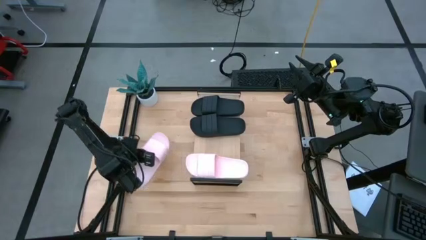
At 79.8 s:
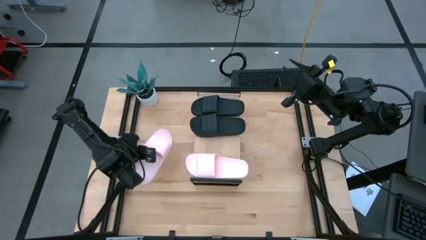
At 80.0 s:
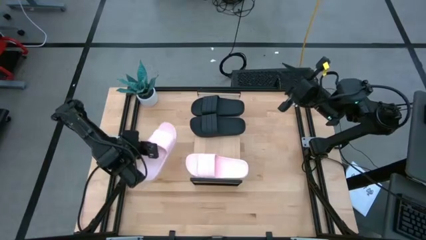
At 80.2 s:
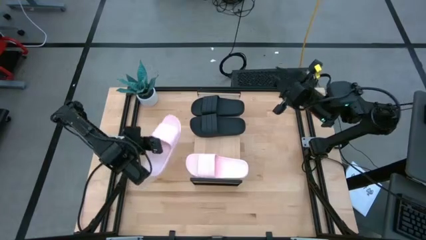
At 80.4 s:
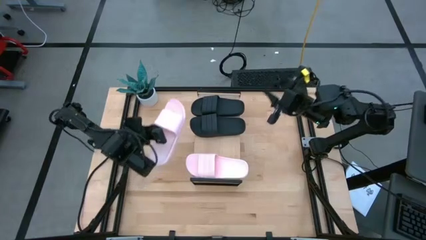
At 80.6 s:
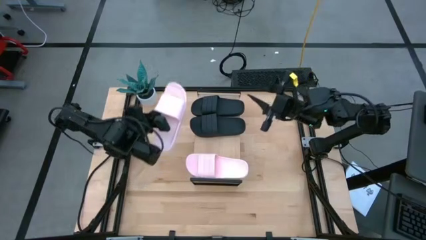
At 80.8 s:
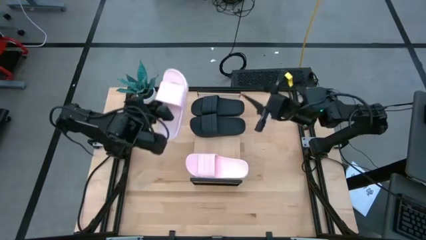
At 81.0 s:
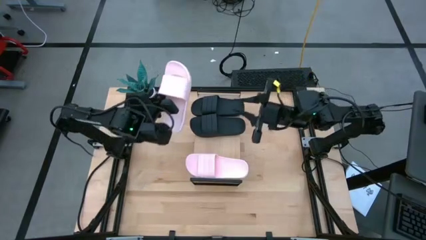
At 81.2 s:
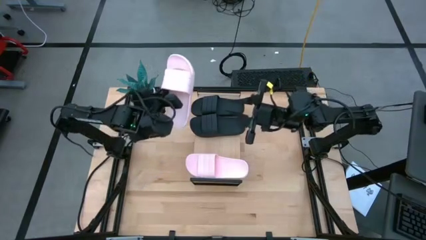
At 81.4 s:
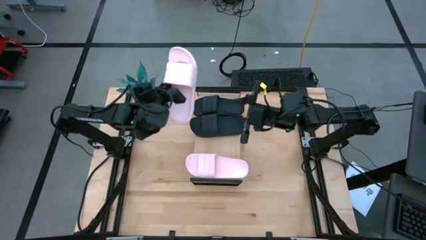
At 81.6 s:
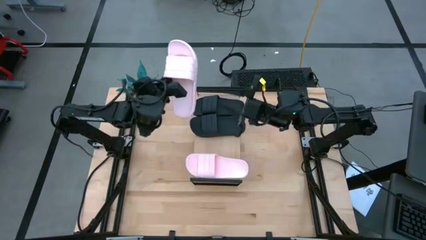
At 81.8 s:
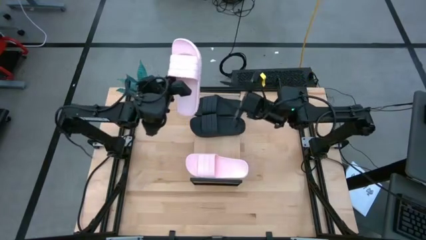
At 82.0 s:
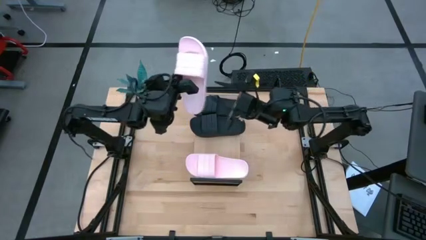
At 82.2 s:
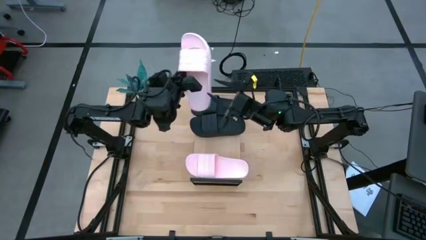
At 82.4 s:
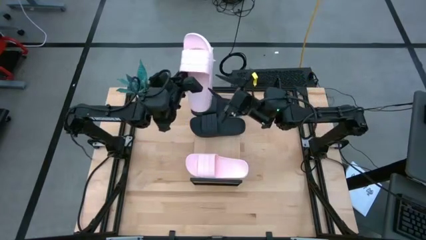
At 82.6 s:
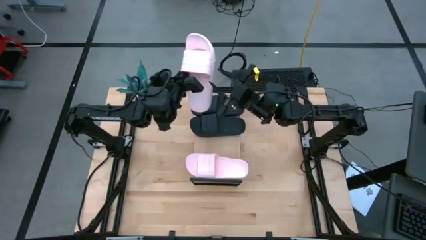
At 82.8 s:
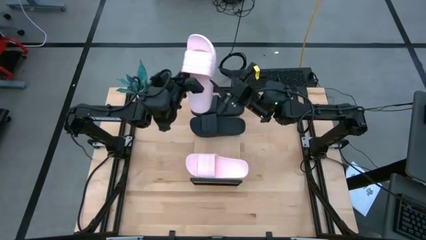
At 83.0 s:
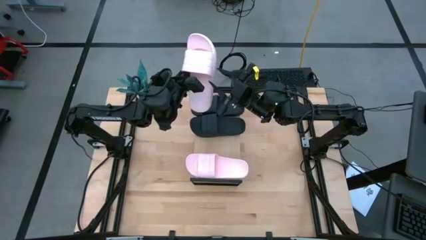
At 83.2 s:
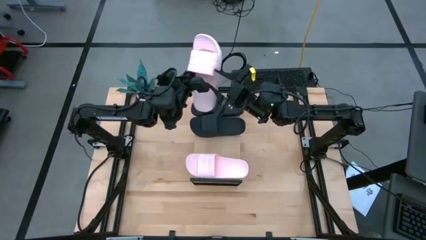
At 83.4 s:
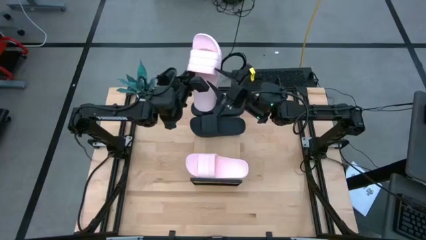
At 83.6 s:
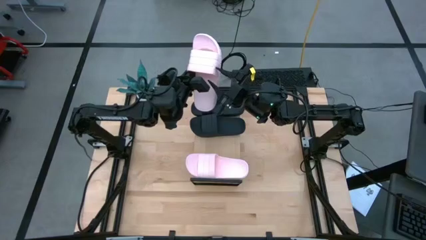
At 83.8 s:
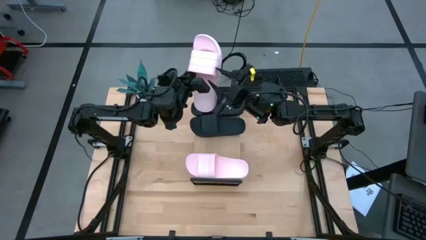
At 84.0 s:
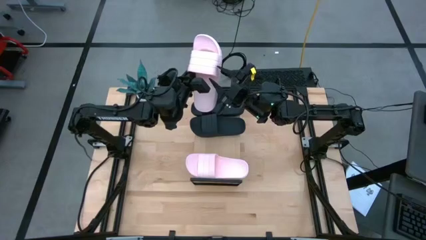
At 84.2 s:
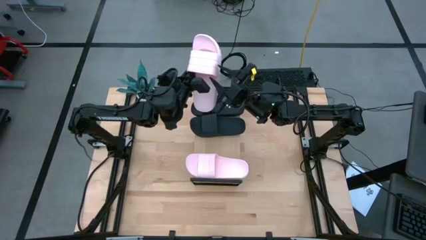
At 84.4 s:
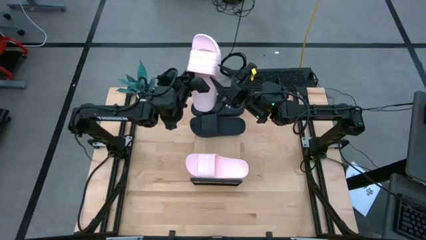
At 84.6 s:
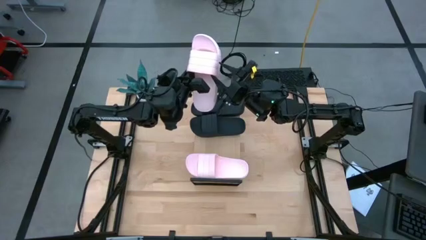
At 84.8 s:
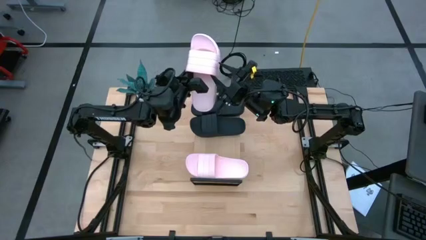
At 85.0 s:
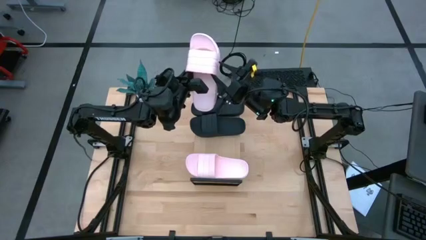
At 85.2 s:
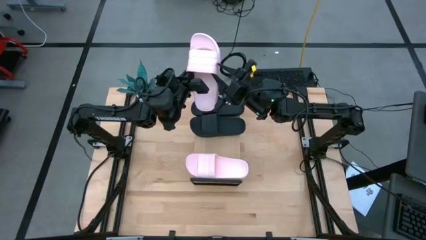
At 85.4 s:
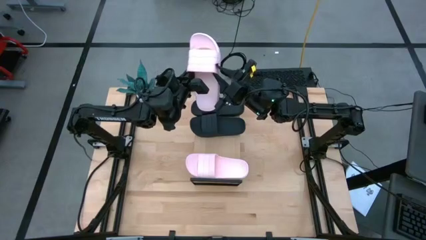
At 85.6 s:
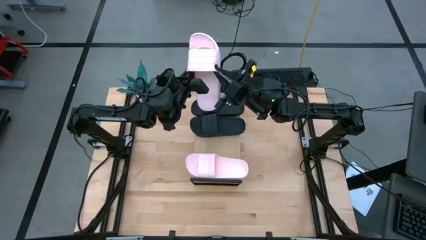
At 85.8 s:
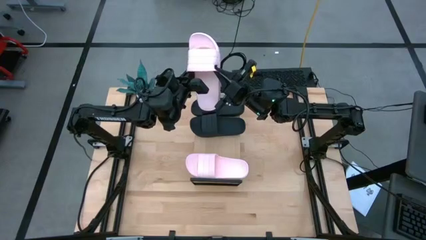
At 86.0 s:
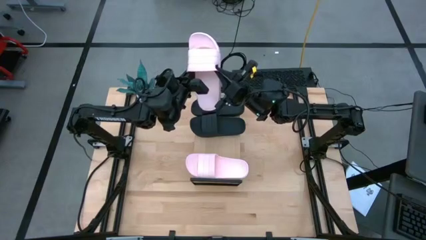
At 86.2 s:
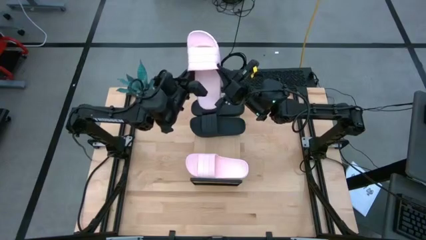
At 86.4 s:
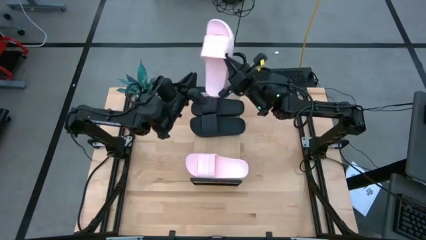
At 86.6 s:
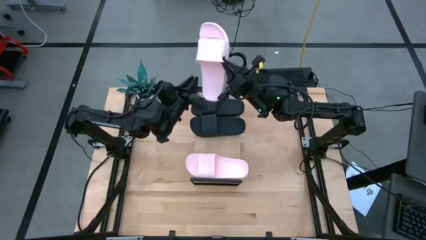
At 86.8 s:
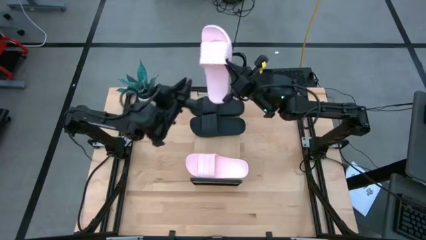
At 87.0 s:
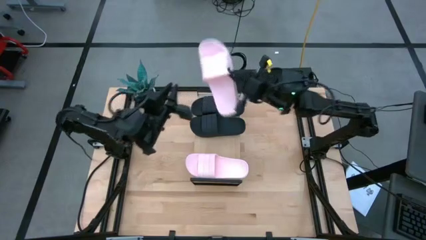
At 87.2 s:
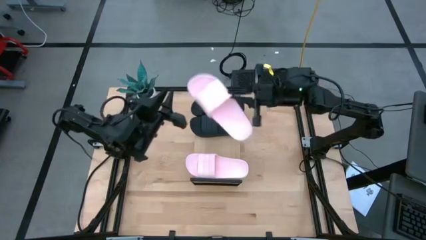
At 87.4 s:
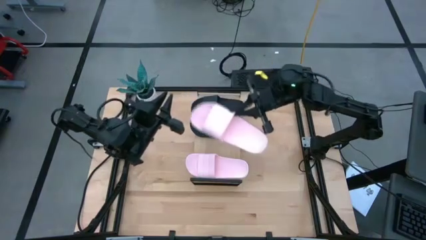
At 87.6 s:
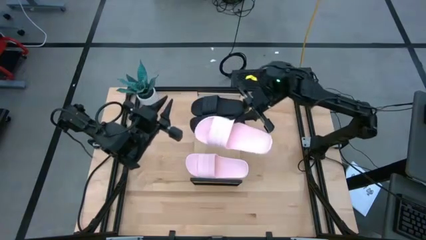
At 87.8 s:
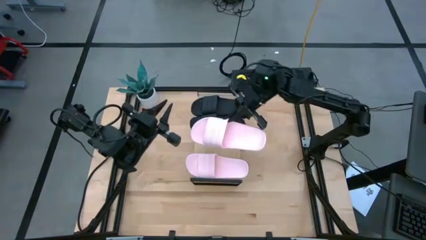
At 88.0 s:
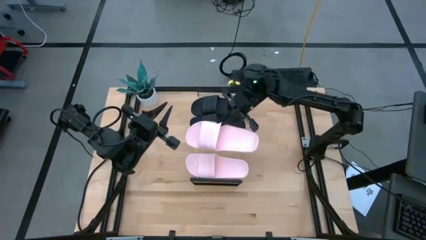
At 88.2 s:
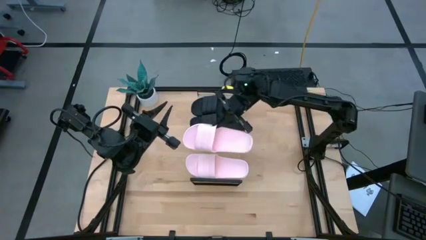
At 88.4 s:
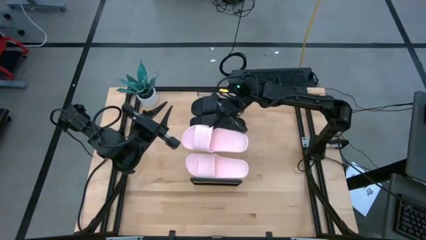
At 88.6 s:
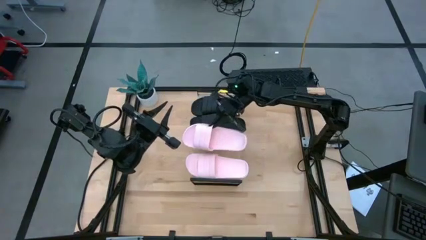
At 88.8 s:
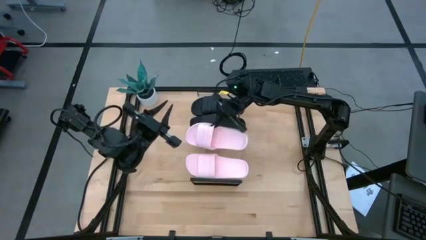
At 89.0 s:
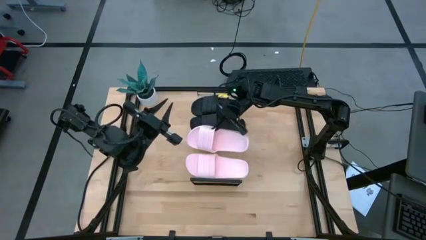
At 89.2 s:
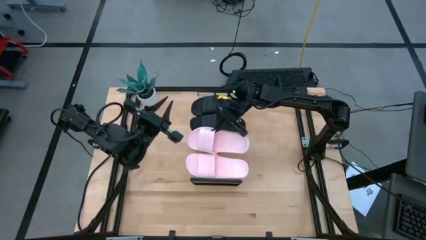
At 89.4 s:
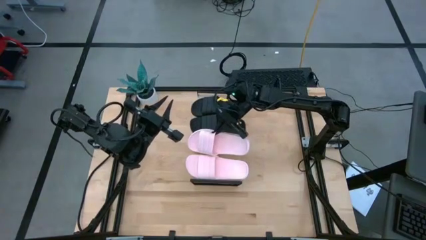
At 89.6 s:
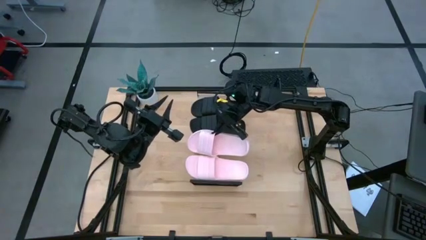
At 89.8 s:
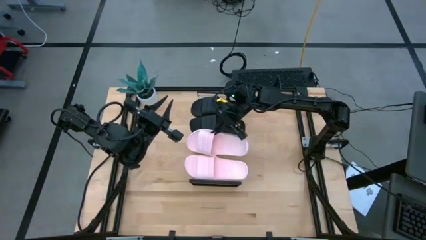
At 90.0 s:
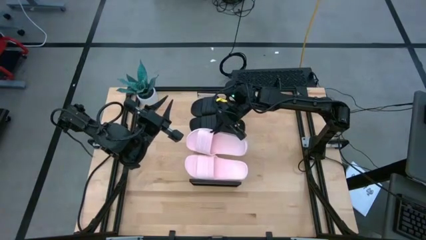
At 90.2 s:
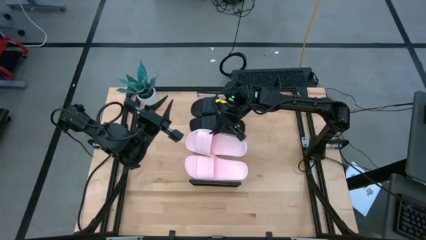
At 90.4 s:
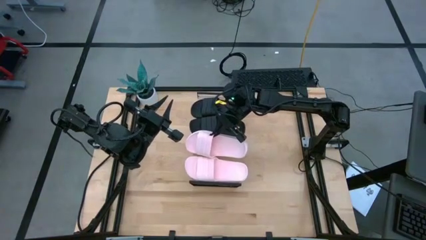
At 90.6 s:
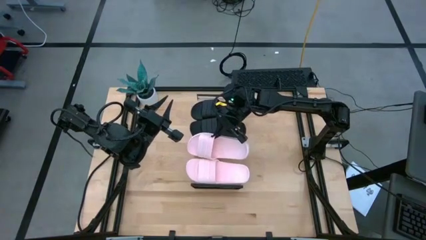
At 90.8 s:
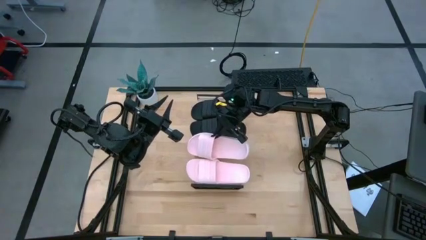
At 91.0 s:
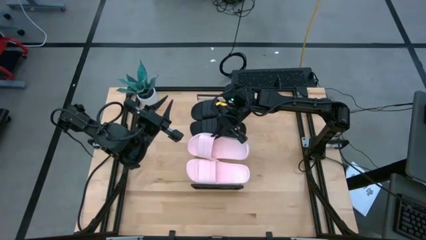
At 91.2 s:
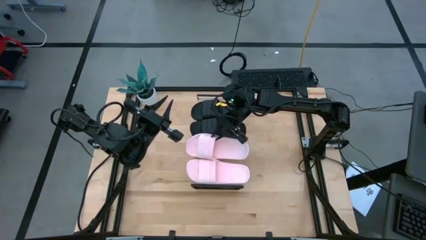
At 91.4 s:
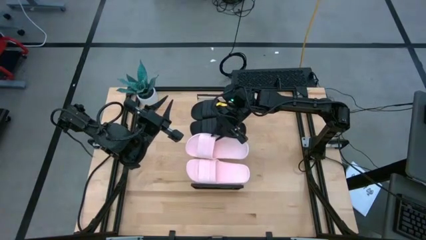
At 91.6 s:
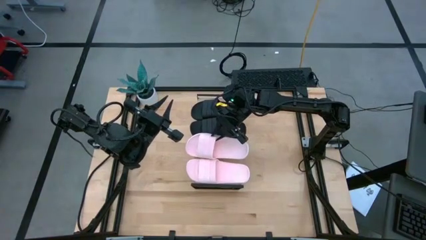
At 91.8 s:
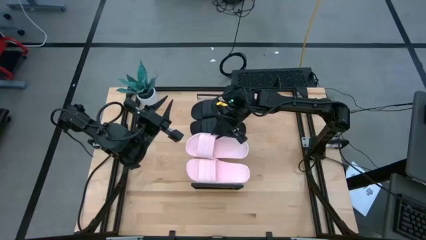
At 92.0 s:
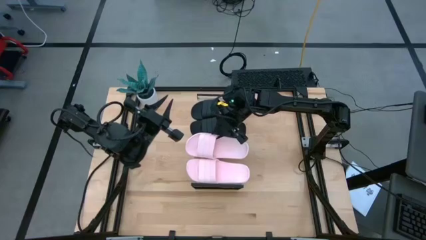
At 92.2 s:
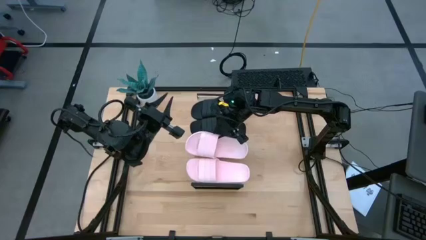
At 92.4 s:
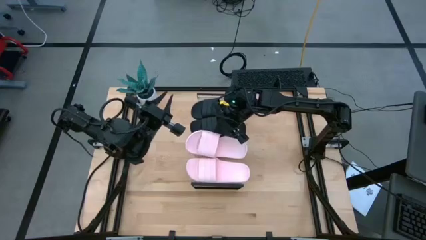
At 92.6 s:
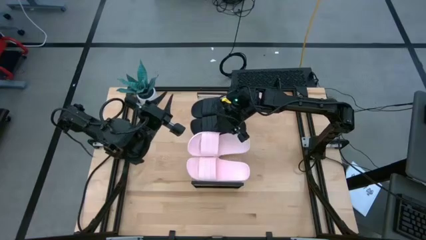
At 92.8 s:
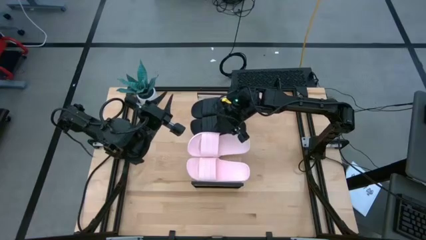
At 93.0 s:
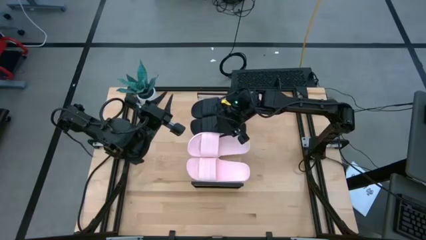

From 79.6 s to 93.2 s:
Task: Pick and place slides into the shelf
Put the white slides on the shelf

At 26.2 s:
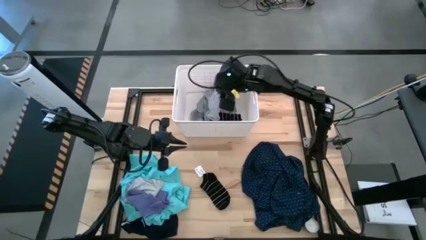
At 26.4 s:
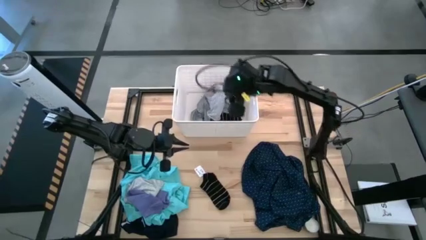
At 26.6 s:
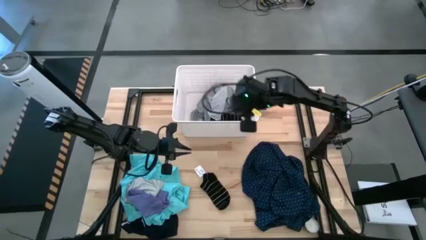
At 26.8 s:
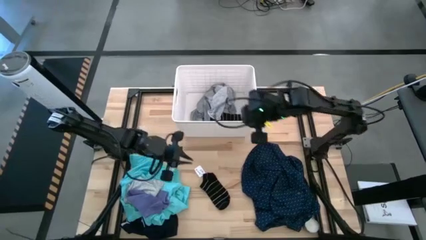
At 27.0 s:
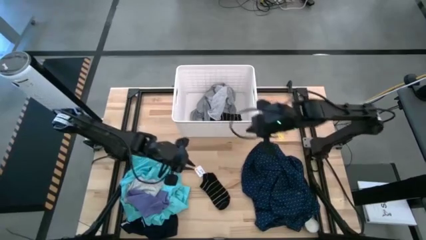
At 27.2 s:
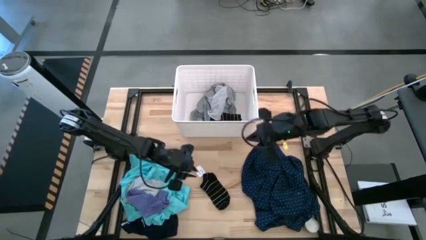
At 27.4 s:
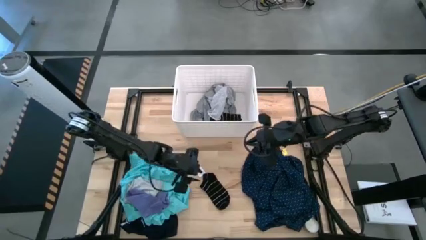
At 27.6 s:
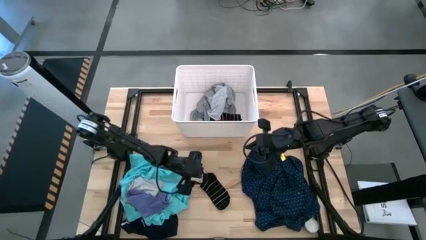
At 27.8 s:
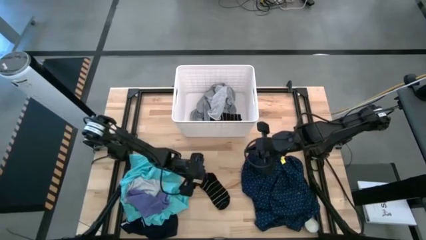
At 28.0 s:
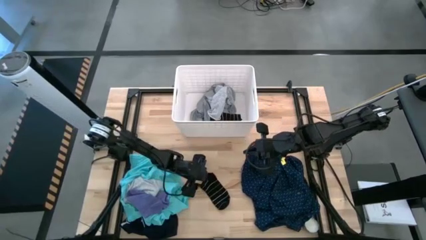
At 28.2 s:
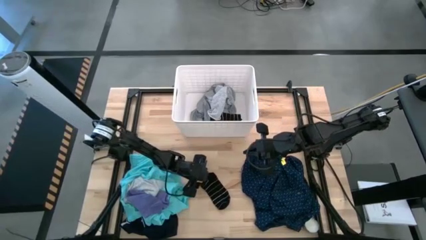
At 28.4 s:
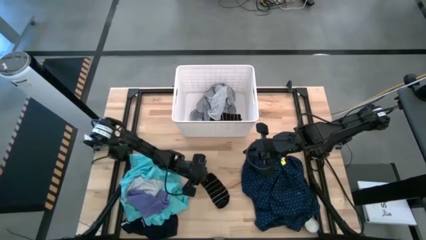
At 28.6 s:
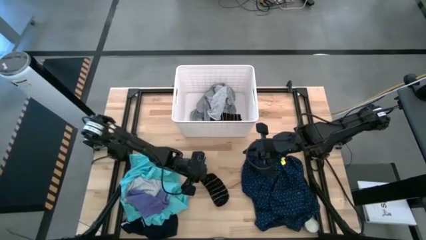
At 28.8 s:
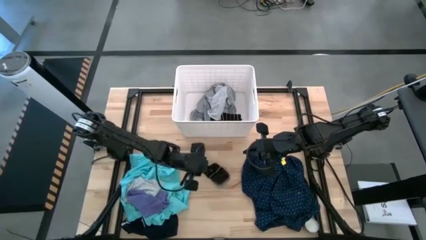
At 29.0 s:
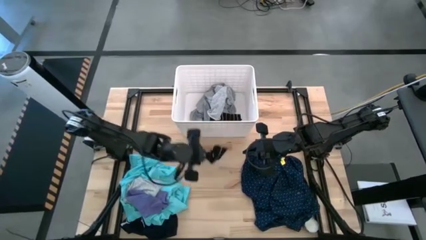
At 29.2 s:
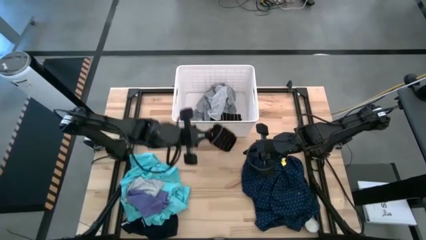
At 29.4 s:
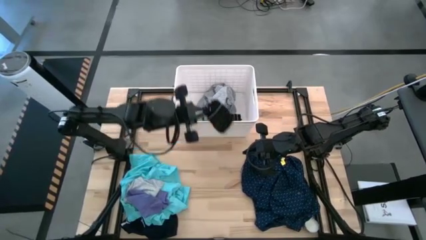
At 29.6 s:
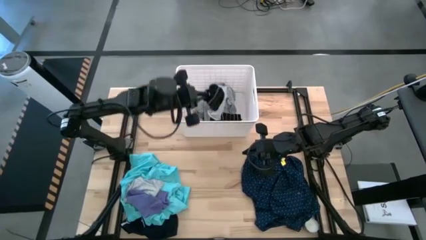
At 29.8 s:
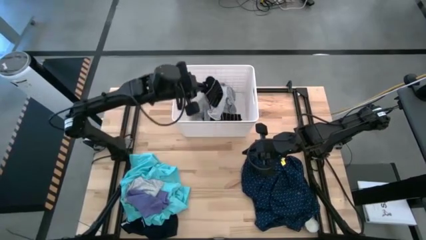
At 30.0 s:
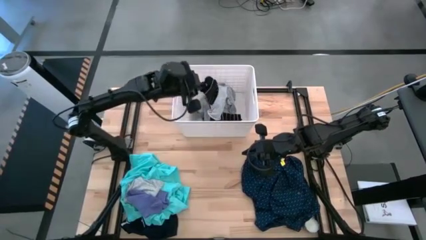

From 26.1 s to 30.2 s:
Task: Sort clothes
Put the black sock into the white laundry bin
